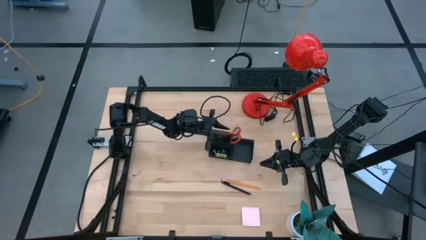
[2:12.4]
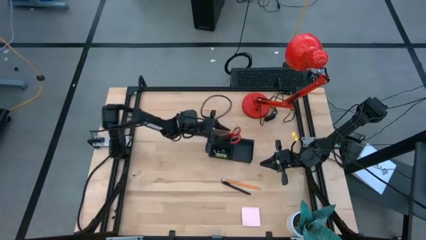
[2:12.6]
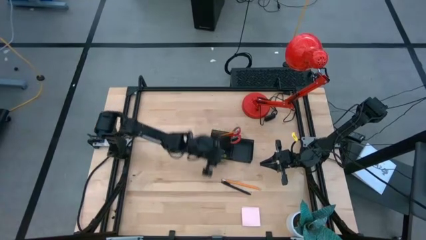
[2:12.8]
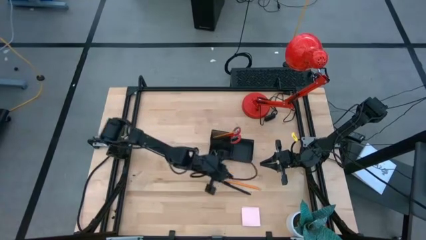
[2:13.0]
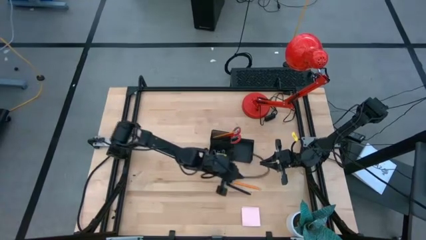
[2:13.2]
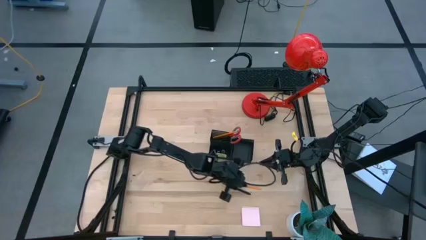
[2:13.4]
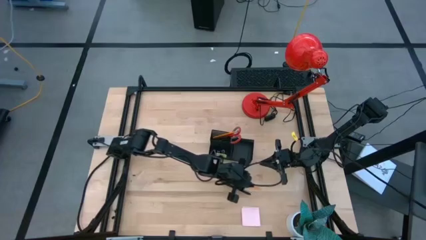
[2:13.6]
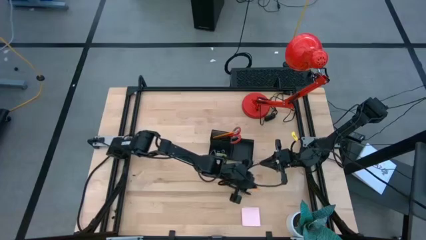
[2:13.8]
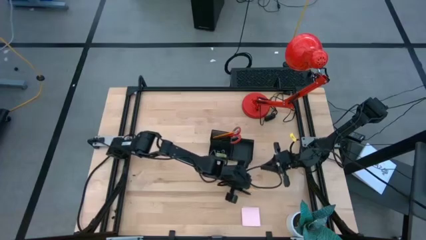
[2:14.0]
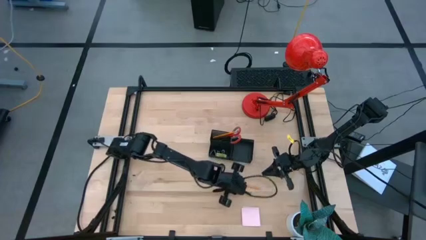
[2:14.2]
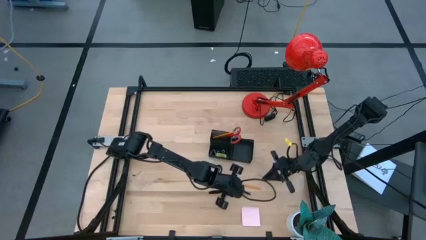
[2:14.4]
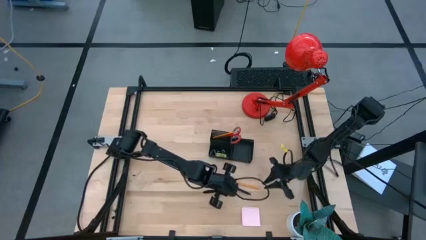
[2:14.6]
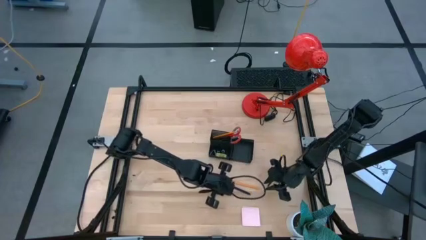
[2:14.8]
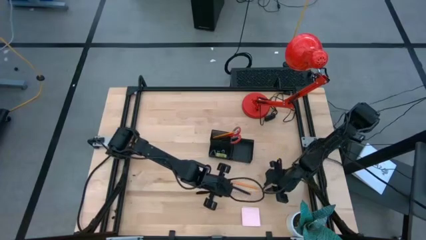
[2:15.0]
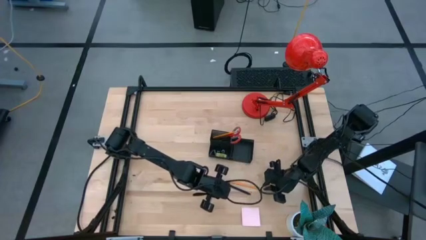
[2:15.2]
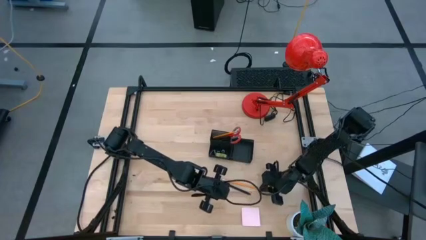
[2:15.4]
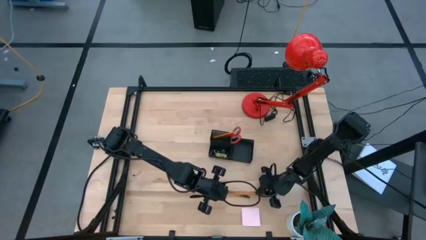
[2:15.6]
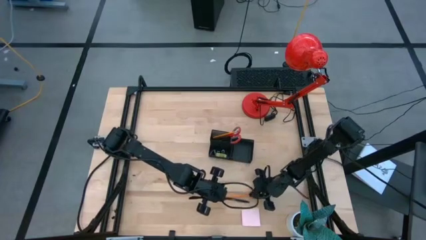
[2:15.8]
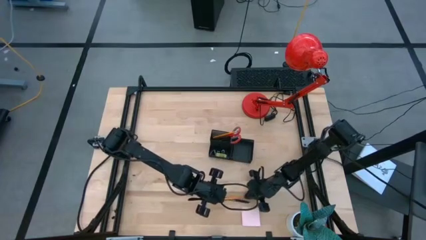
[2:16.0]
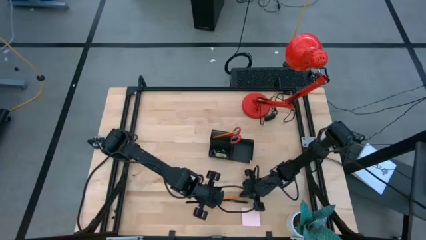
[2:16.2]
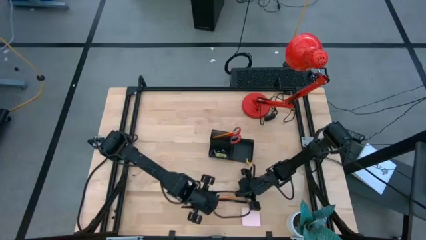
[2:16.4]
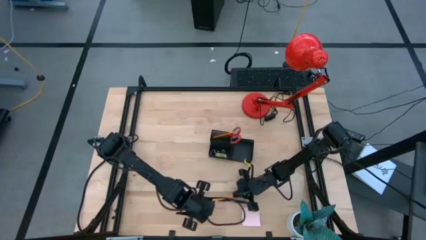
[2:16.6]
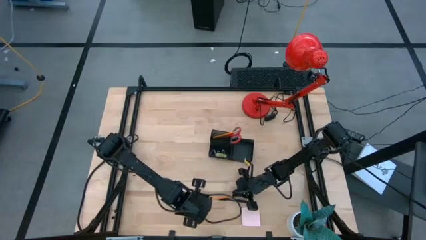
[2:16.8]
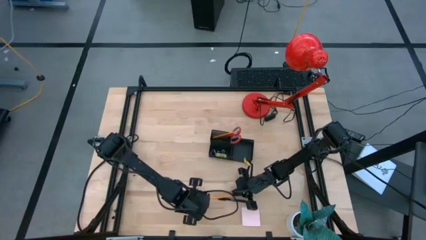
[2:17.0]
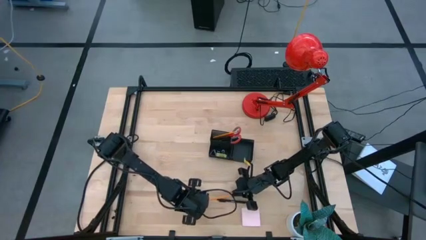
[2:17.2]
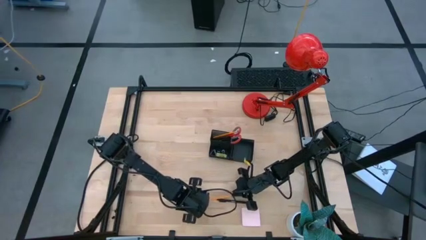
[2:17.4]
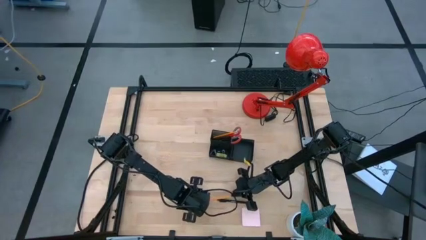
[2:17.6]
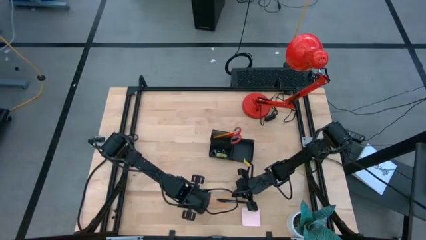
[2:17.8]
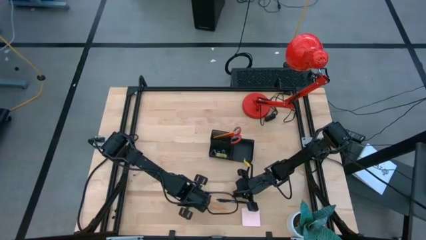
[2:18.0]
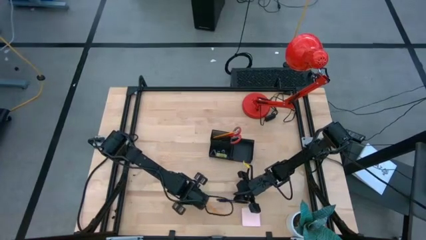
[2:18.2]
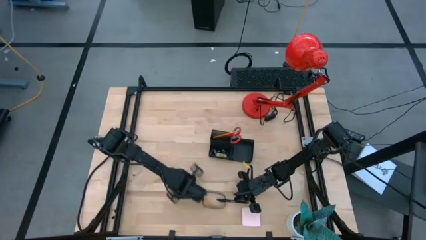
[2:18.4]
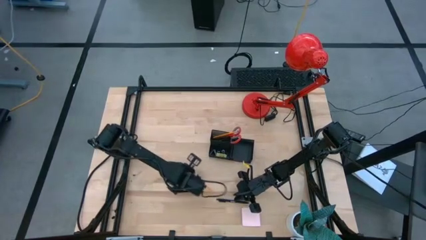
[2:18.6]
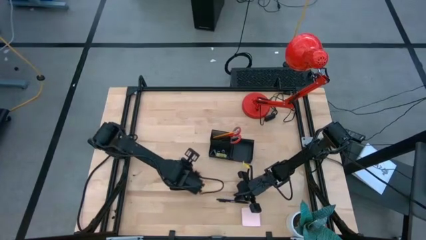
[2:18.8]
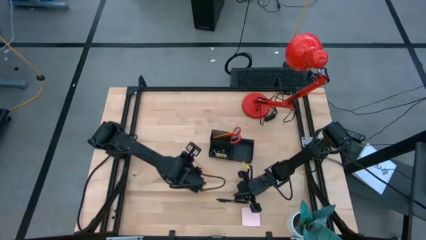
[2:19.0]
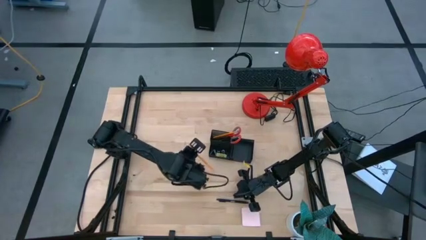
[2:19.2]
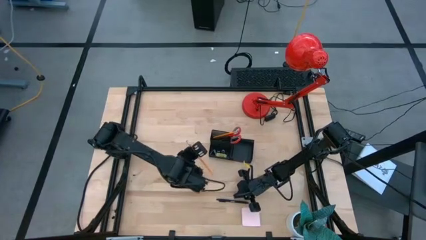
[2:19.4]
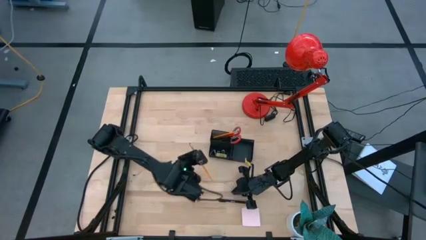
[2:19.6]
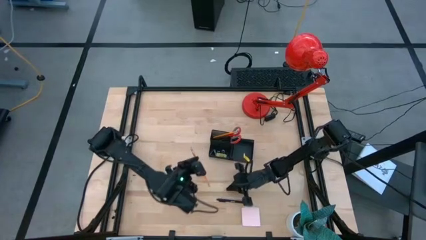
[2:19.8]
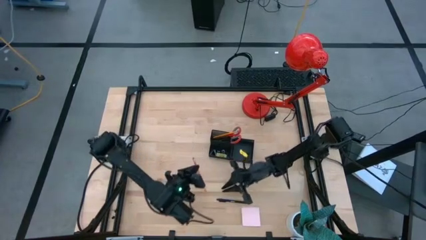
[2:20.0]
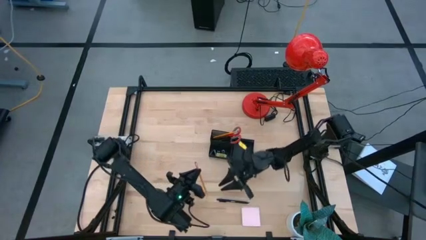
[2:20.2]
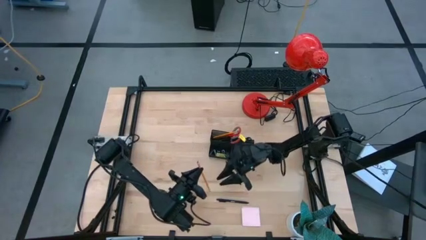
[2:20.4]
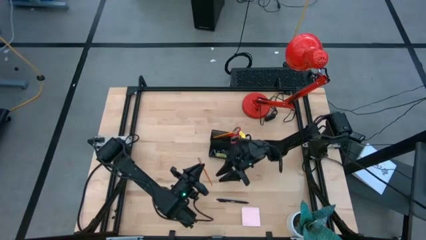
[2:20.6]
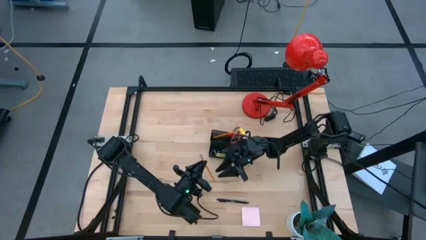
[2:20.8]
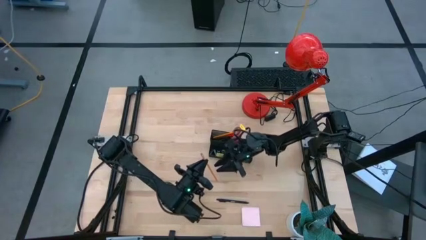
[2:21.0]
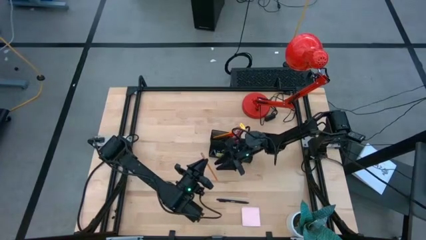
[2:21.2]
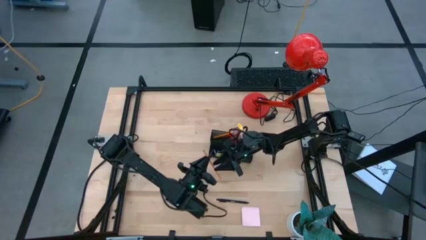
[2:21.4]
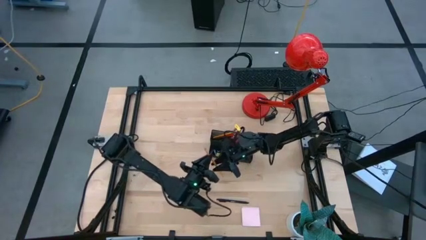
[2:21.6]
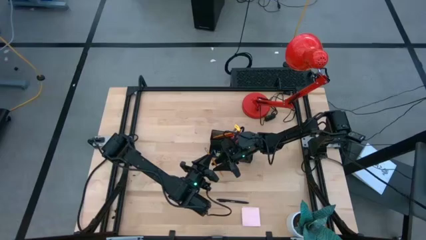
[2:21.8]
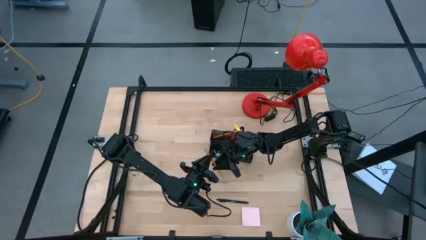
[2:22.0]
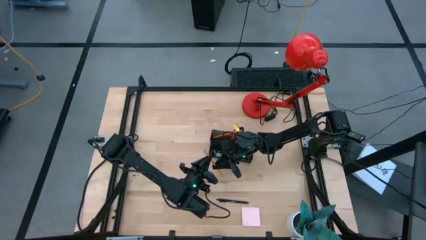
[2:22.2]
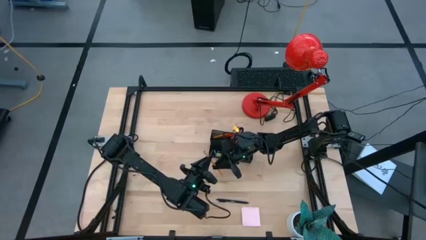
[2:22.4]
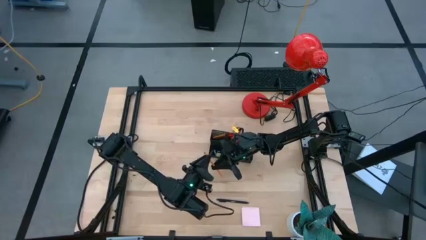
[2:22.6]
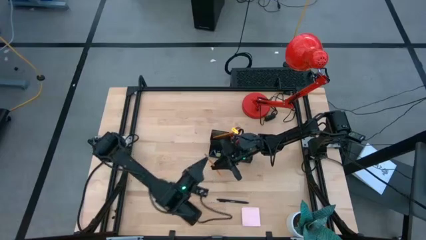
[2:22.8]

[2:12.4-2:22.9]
Task: Pick and place office supplies into organizer
Put the right yellow pencil into the black desk organizer
